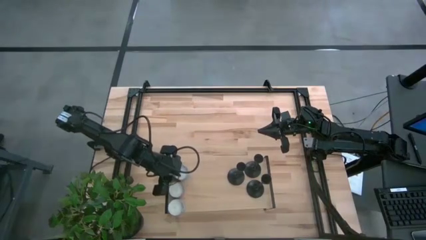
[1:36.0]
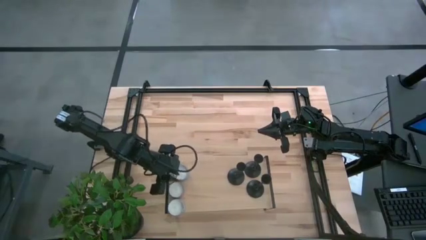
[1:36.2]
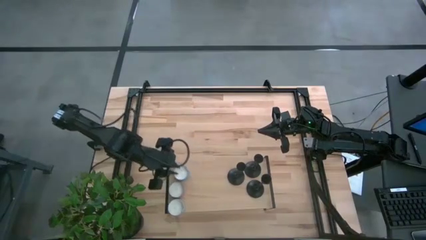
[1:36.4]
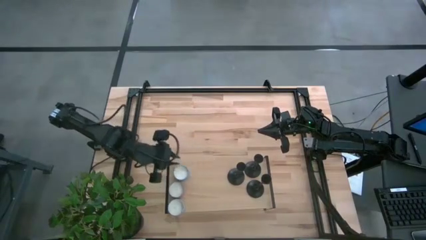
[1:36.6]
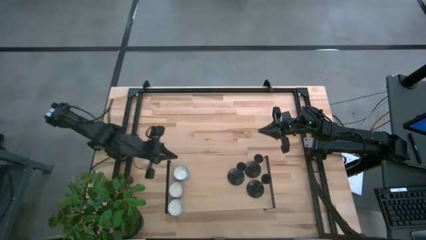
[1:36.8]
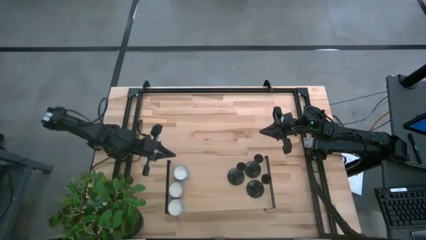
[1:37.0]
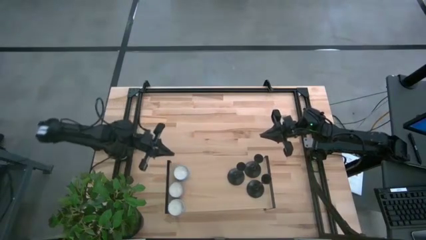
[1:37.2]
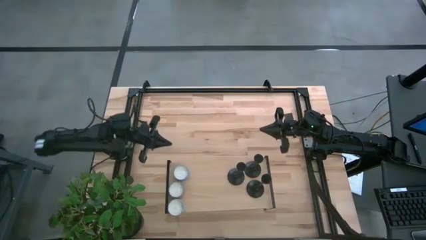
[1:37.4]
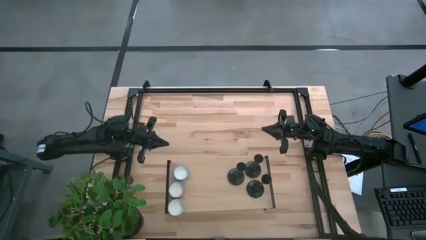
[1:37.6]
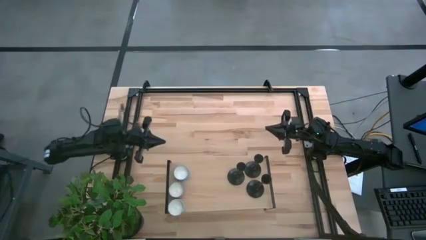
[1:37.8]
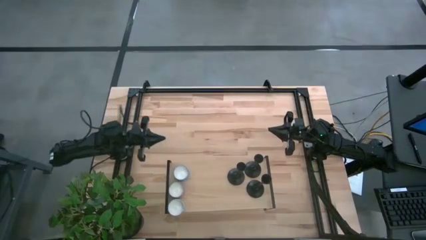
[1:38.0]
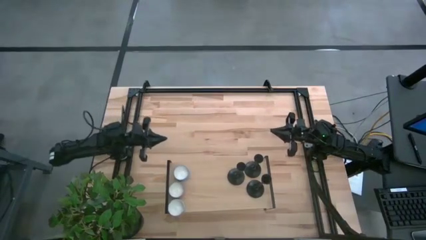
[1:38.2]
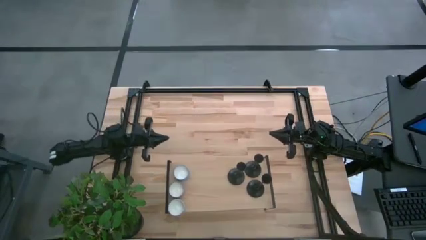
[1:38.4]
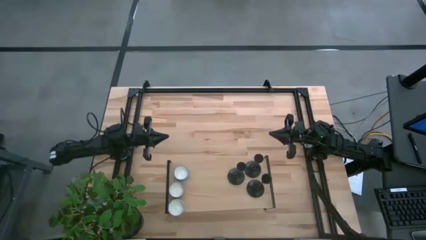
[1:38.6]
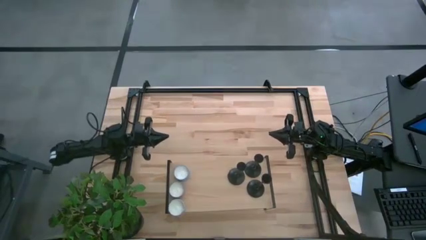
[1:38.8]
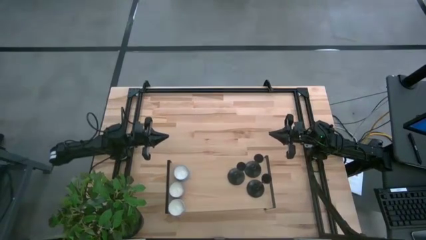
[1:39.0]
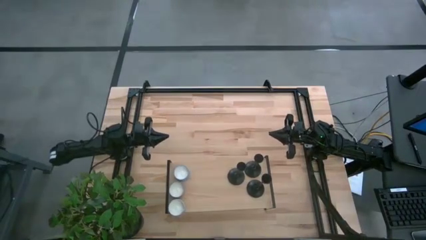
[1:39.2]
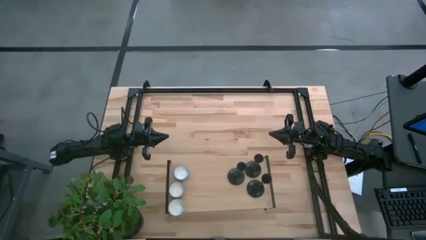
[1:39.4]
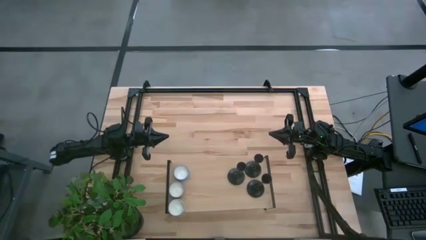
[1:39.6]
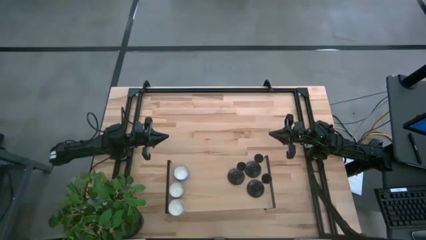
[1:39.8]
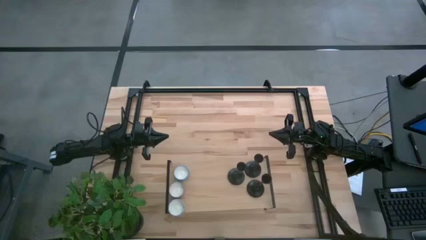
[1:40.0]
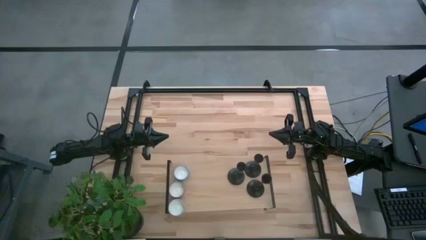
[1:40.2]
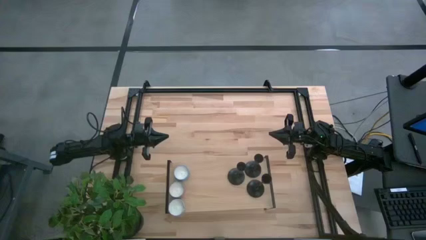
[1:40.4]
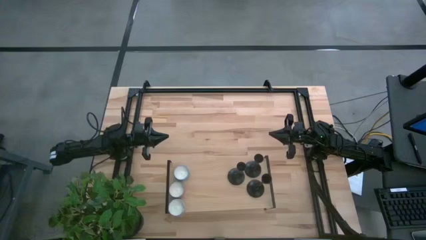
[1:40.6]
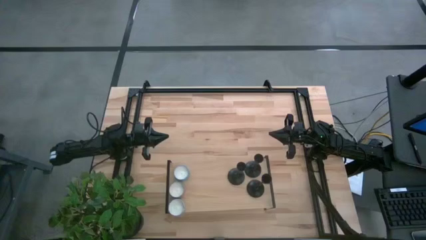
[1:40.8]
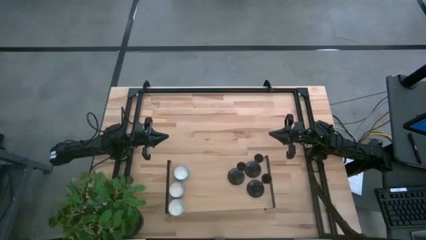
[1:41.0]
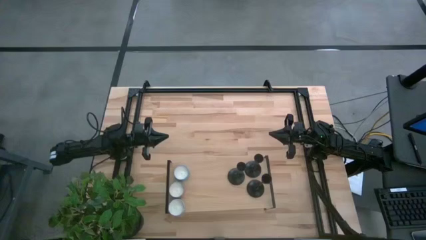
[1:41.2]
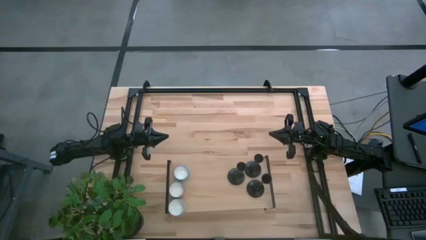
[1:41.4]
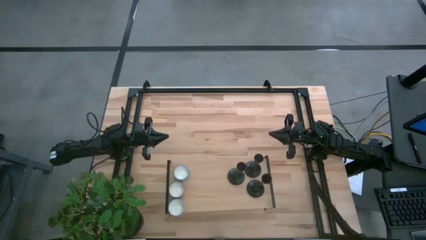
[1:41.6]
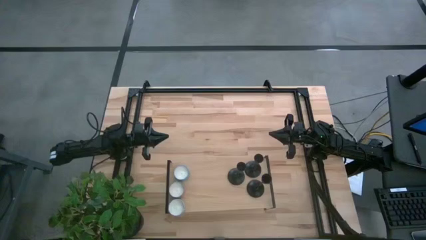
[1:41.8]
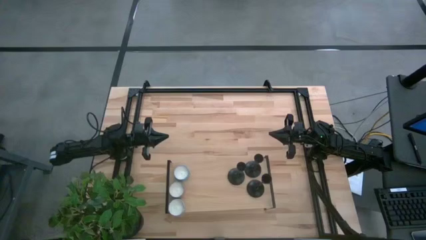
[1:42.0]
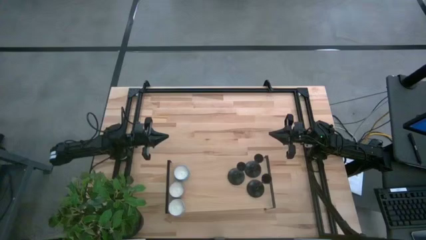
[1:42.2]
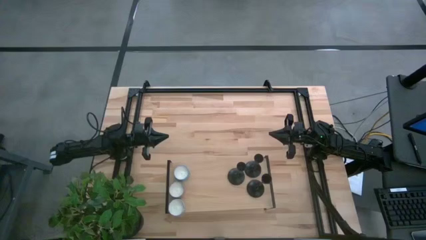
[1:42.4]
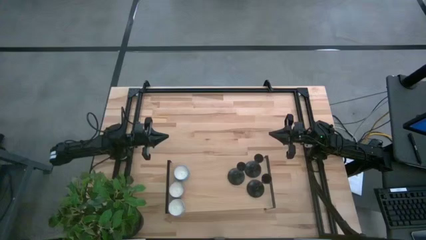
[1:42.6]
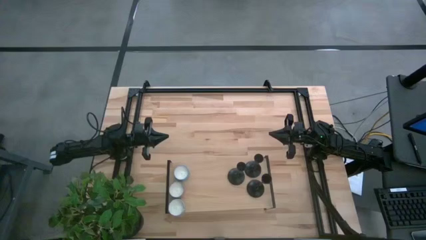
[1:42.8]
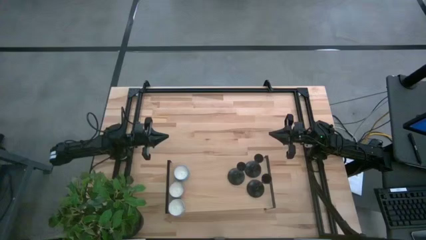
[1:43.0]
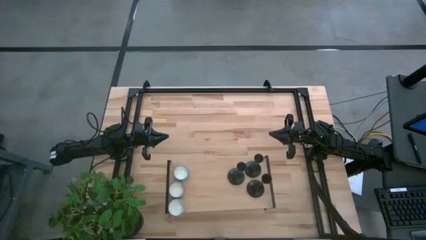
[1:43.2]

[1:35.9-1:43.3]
Task: Pick & Place candle stick holders
Return to home position

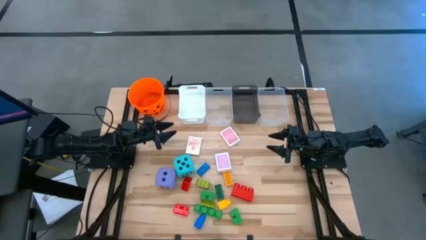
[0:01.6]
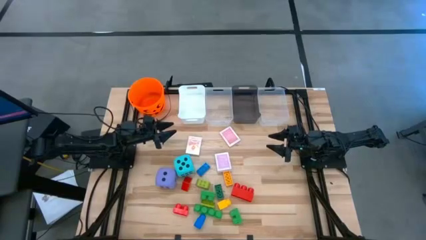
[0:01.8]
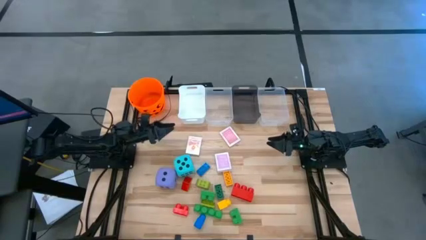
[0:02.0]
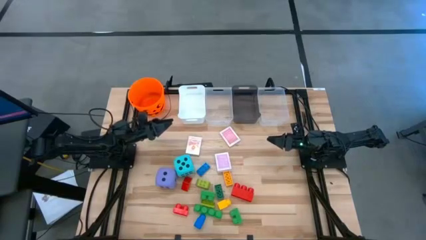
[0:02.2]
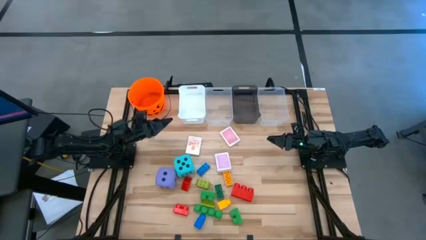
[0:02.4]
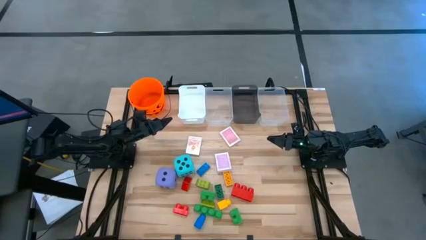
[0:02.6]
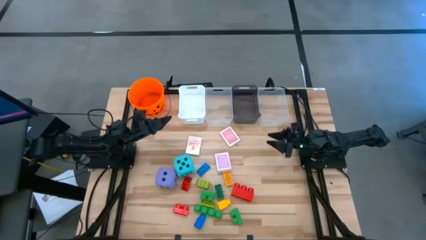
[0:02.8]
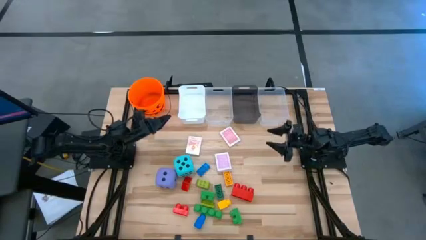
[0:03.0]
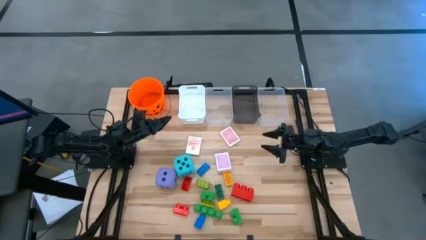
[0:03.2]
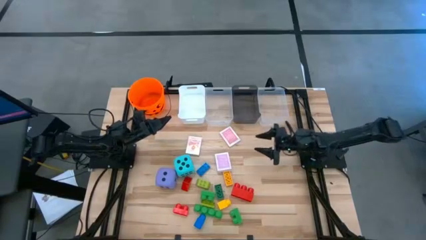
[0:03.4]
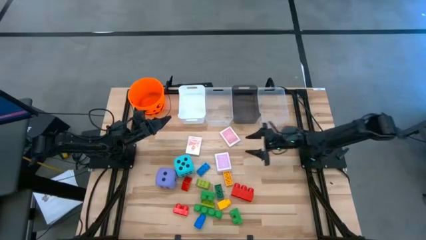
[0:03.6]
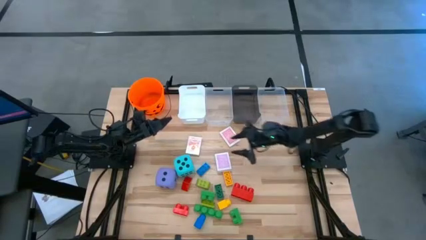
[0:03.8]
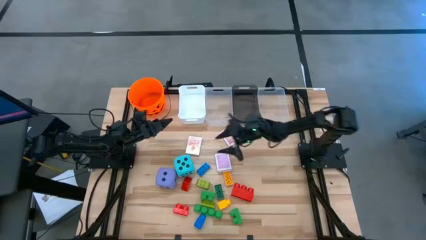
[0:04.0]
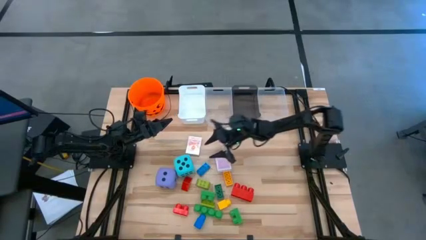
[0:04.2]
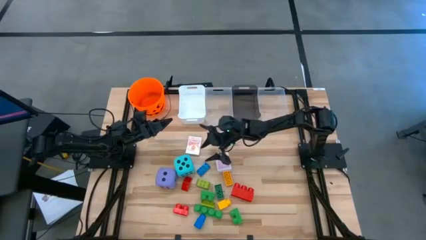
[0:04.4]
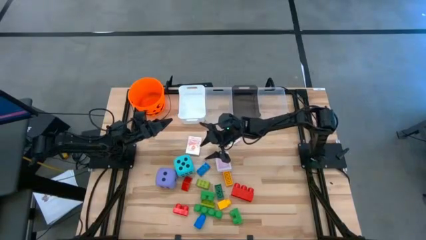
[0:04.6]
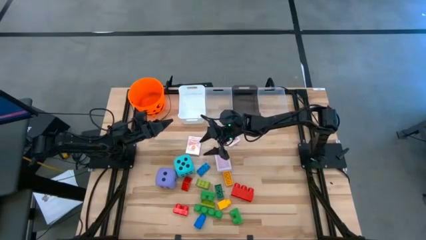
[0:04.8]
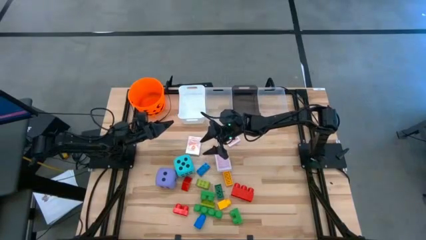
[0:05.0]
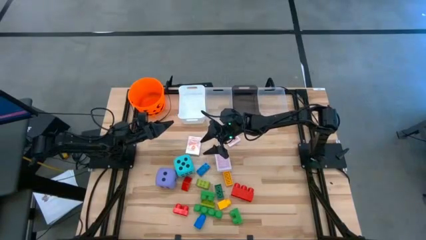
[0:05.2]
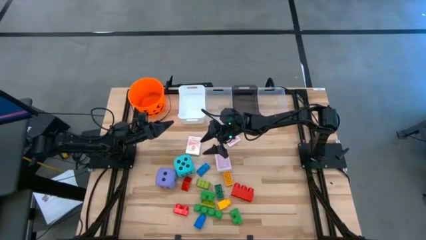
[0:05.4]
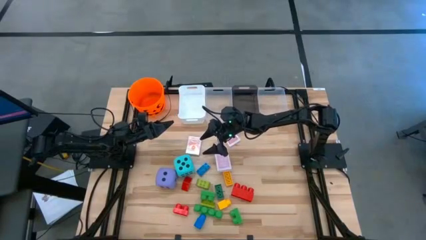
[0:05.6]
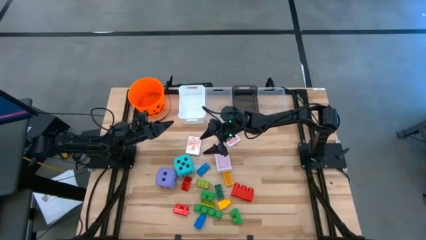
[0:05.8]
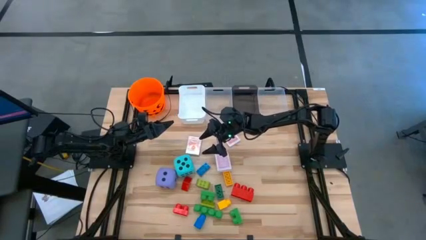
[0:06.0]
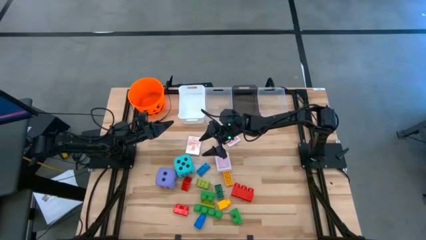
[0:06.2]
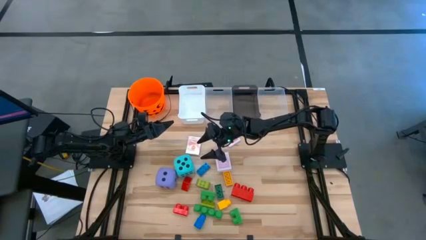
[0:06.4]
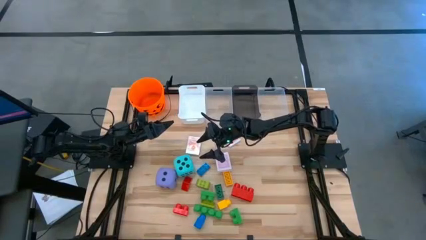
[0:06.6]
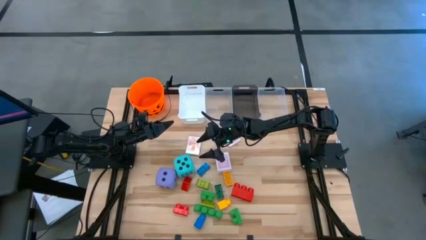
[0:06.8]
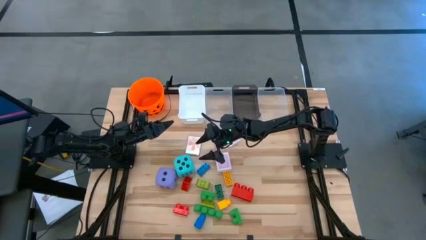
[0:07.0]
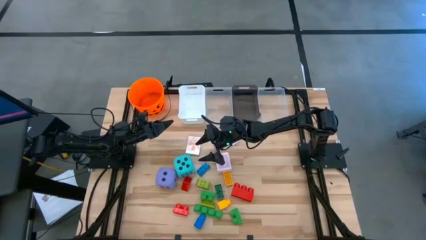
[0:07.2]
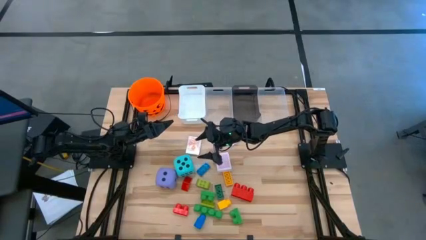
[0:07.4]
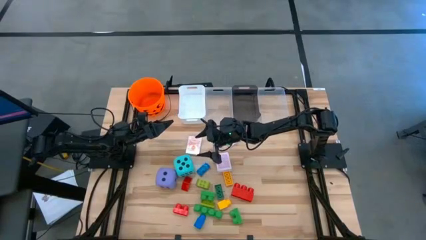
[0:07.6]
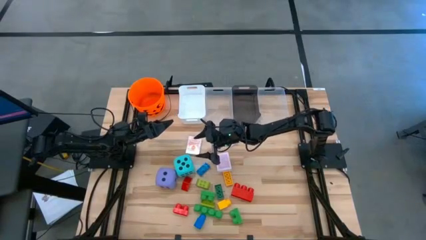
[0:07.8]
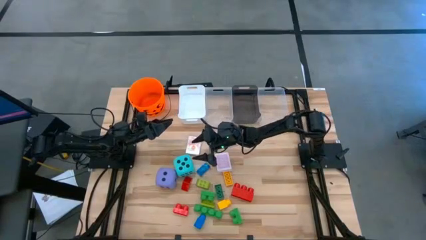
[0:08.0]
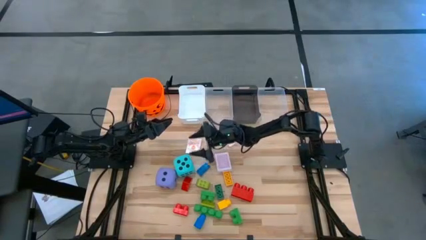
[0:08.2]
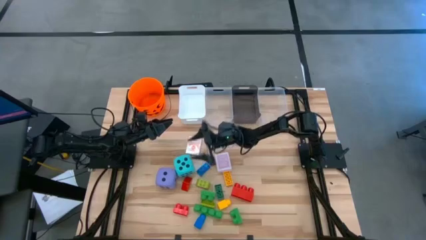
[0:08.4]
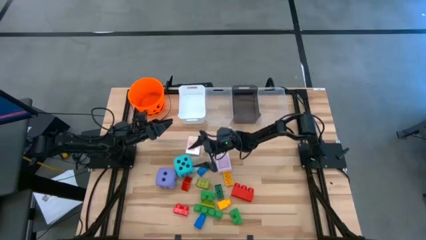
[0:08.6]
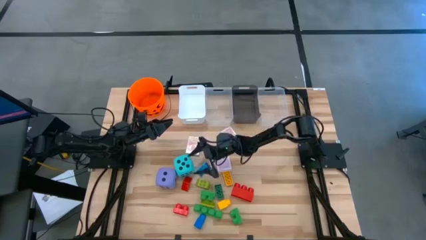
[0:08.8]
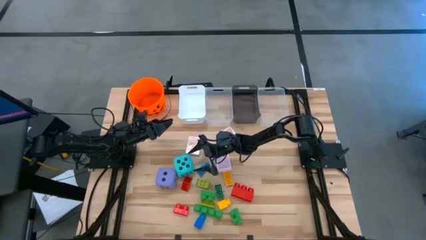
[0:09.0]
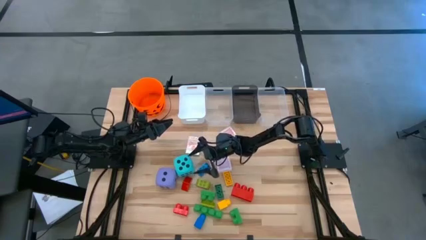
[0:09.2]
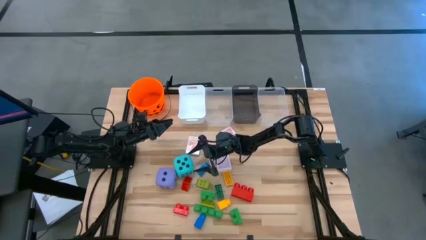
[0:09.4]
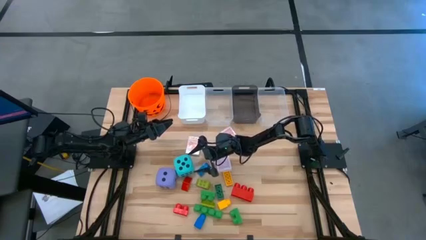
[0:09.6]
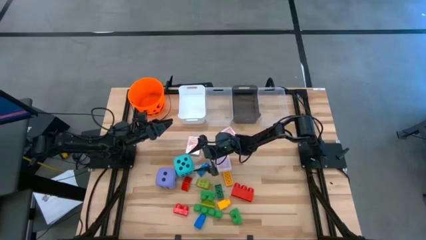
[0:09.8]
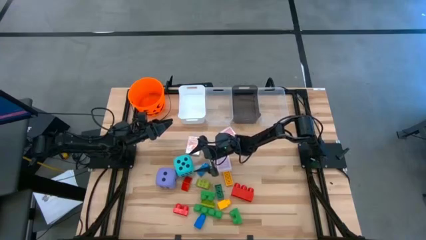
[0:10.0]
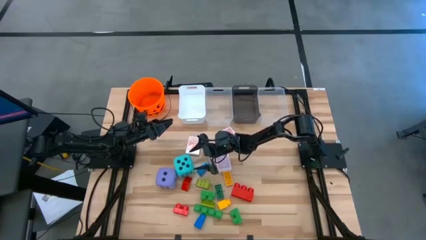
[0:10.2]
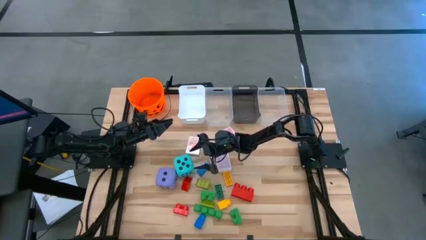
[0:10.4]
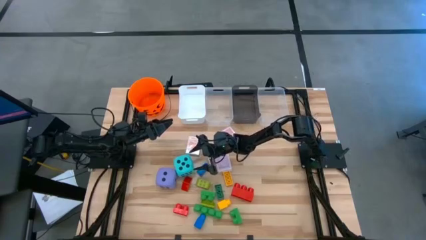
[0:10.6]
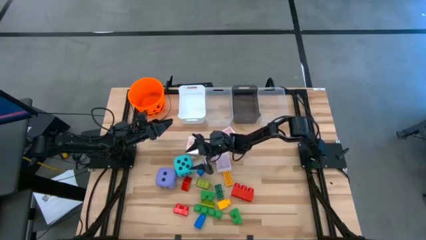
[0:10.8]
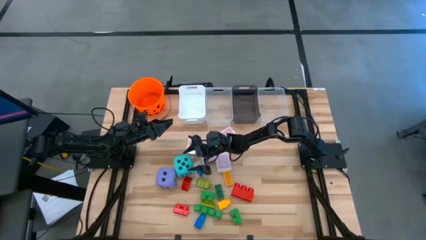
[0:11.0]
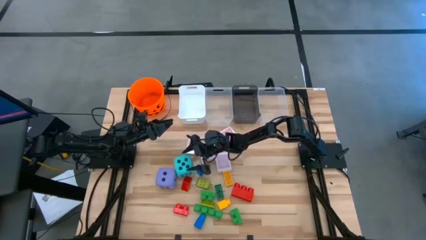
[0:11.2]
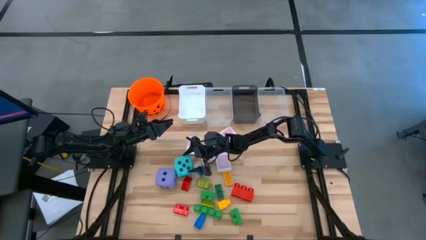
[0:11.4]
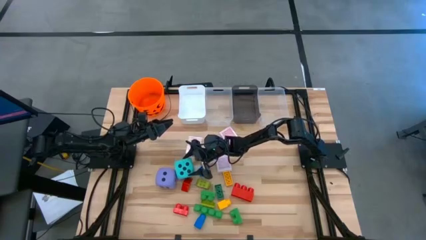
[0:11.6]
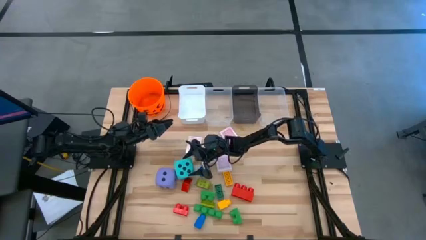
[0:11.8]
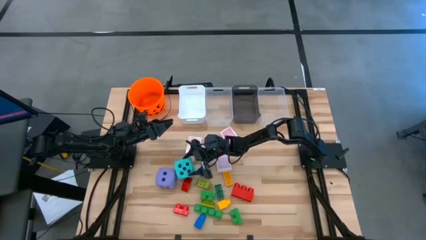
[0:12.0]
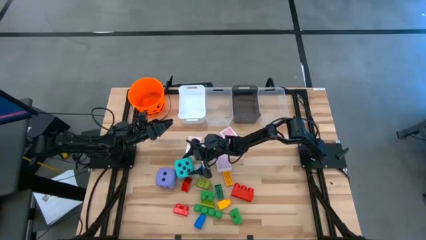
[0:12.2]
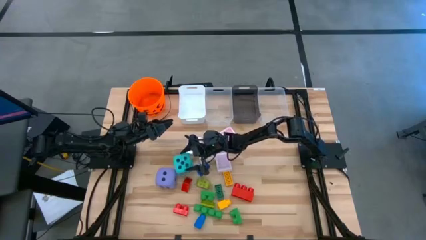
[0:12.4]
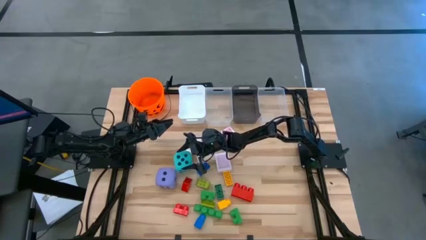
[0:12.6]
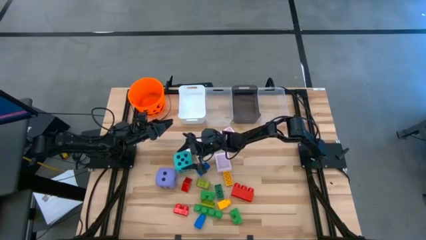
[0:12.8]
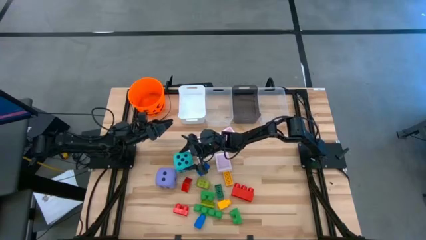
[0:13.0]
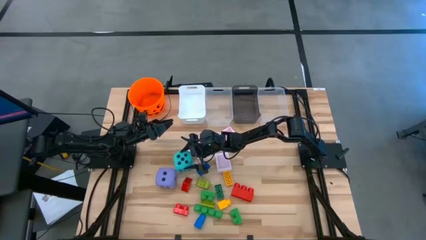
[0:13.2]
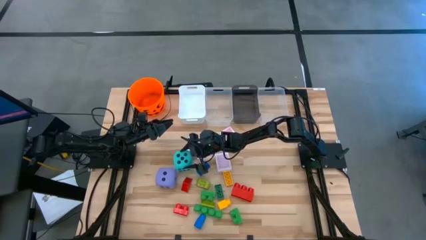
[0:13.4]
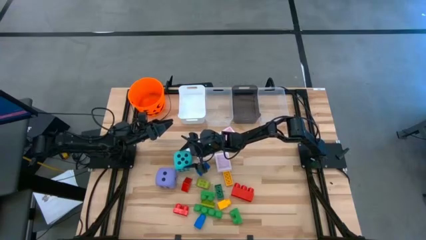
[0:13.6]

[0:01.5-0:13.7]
Task: Pick & Place Toys
Put the blue dice into the left transparent bin
